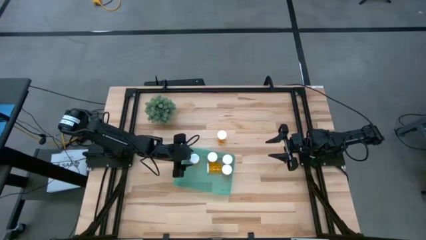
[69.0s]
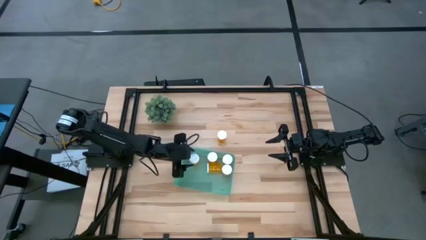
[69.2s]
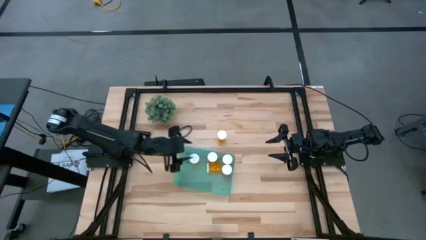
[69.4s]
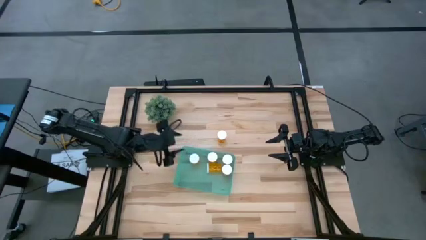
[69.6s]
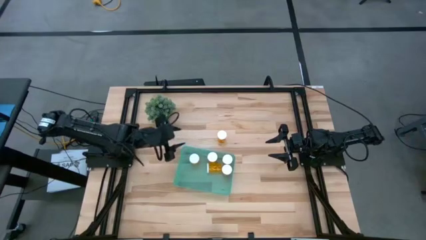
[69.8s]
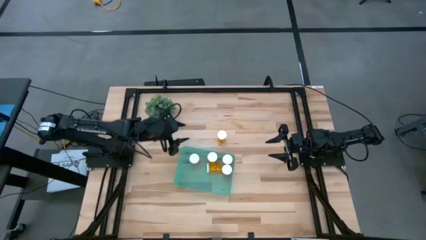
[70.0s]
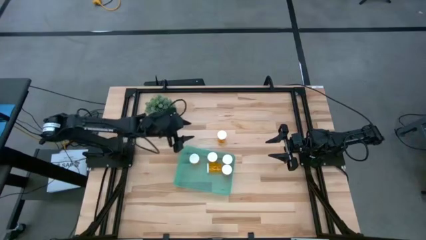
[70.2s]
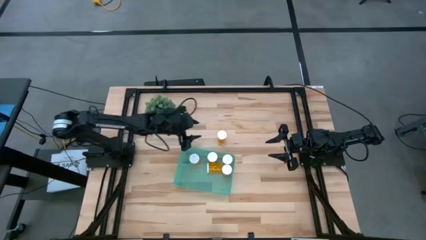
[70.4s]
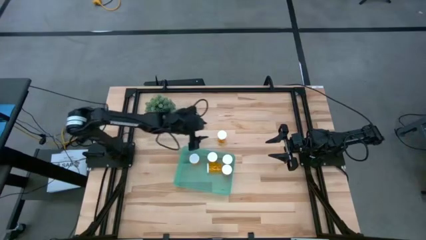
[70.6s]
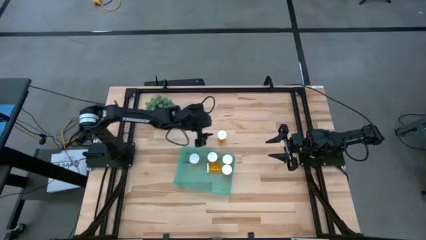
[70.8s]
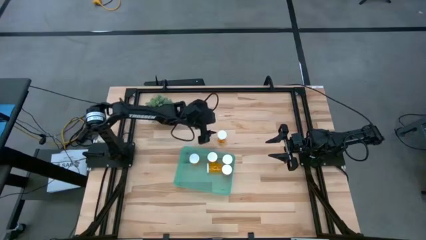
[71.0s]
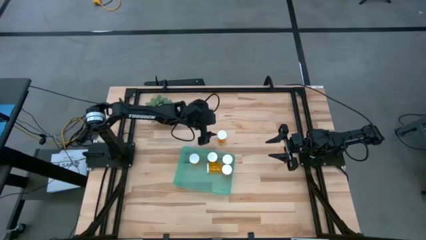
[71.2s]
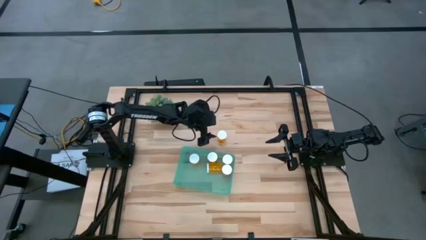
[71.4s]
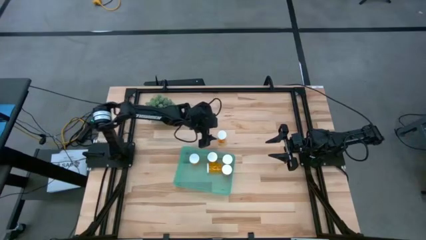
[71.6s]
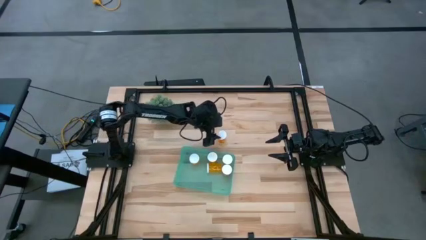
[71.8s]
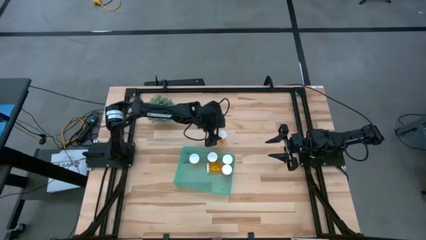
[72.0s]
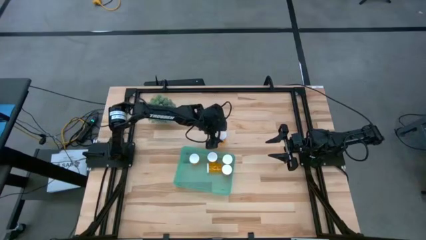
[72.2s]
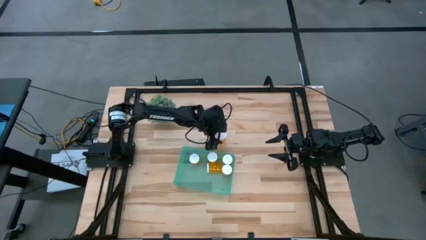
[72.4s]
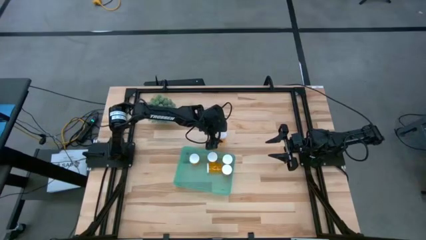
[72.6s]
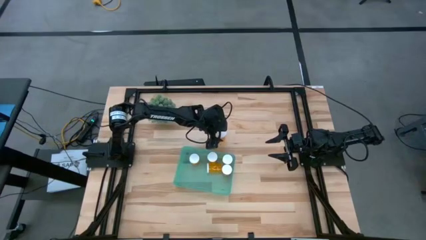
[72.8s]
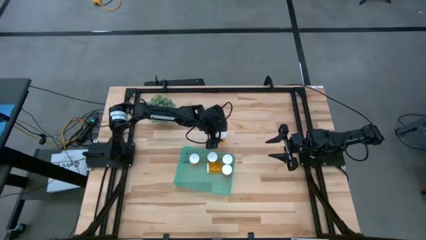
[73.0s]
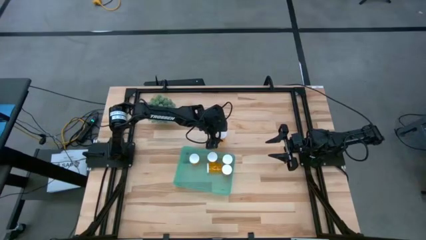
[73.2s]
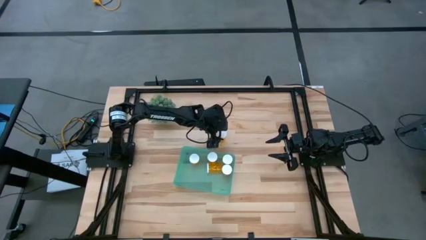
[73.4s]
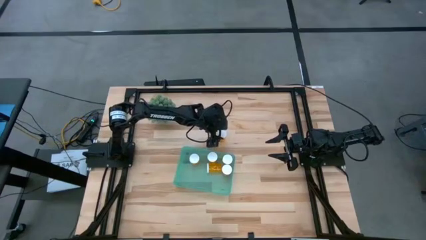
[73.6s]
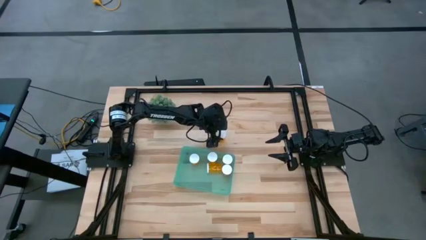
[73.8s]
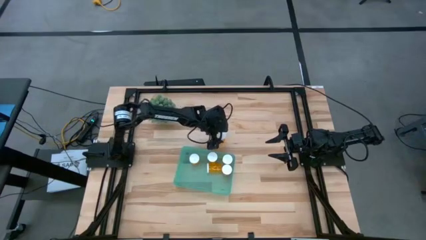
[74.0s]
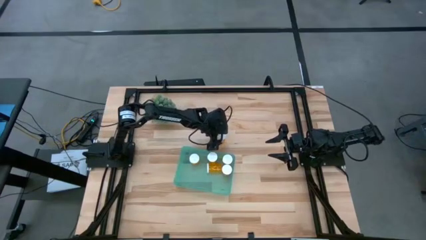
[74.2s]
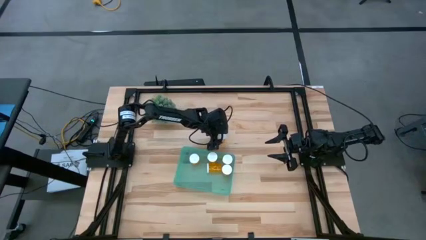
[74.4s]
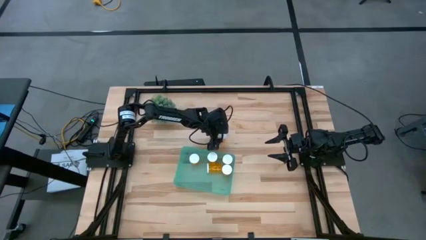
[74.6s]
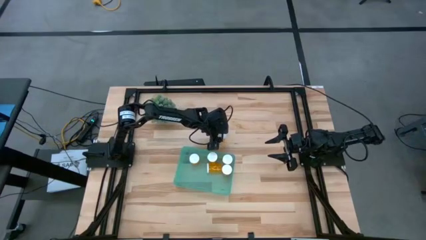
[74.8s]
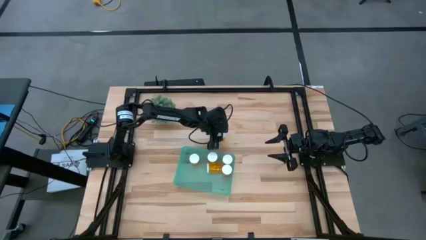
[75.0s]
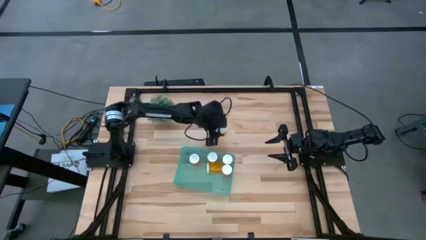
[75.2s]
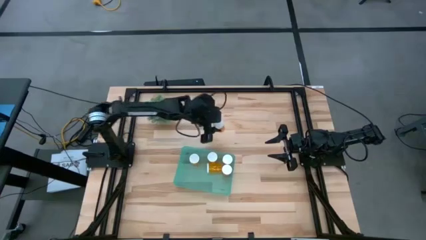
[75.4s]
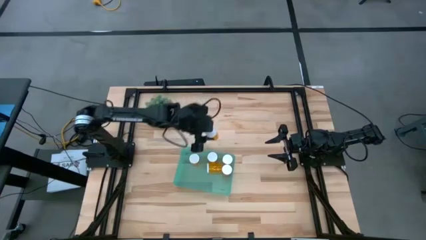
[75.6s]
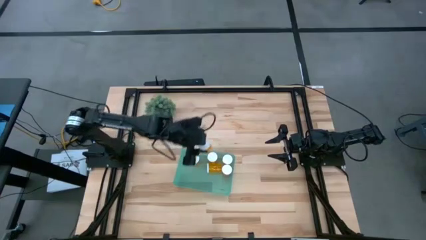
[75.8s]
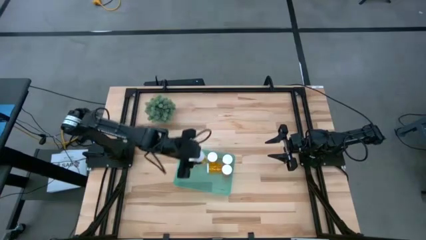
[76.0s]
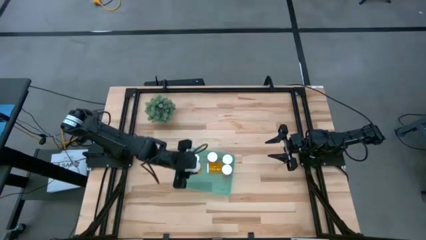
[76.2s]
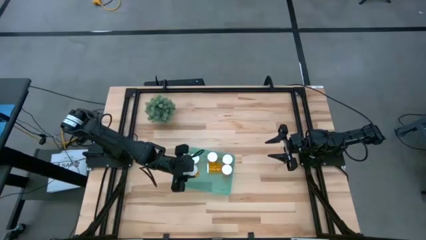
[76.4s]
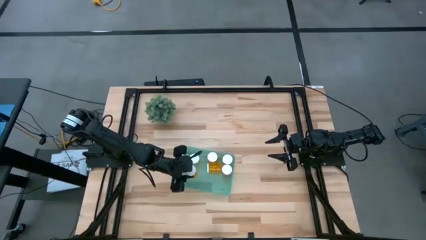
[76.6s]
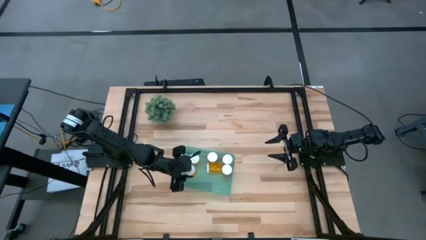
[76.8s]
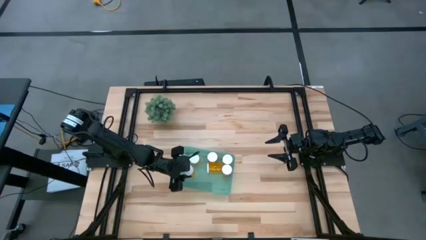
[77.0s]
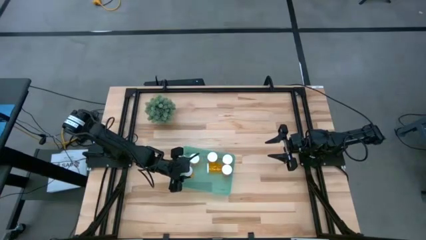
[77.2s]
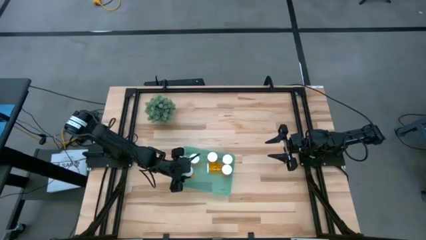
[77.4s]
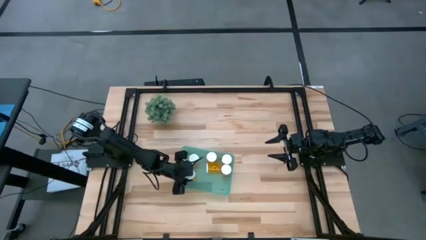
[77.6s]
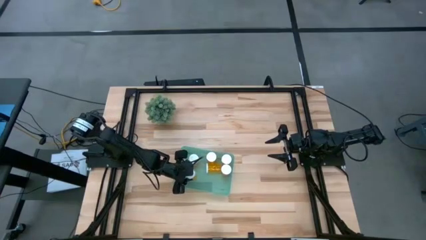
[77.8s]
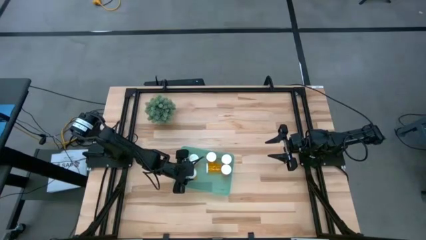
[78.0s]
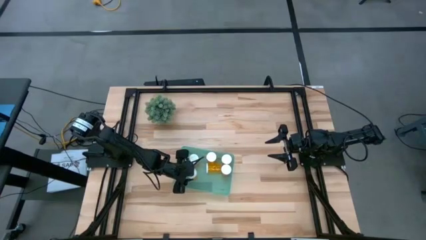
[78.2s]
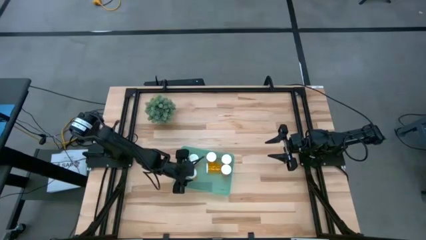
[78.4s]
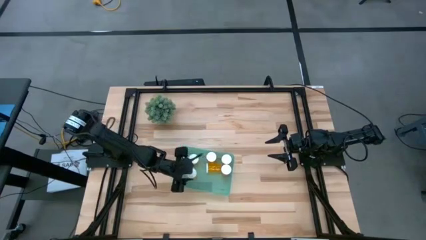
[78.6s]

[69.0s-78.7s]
Task: Pick and place pill bottles into a basket
Put the yellow pill bottle into the green bin

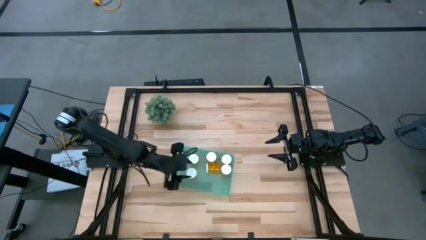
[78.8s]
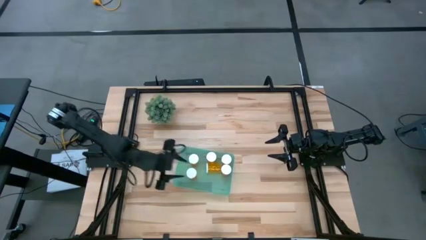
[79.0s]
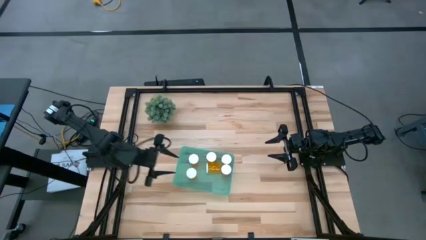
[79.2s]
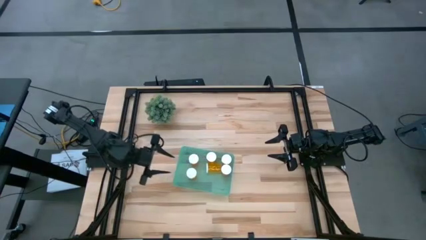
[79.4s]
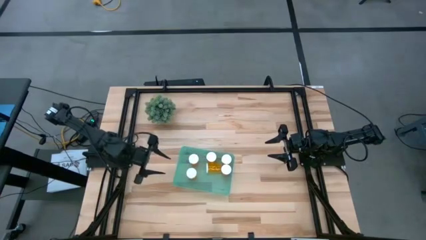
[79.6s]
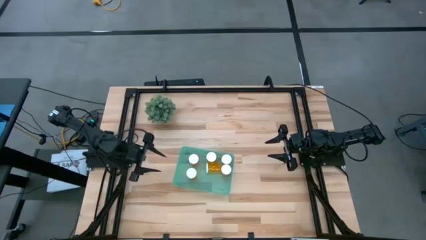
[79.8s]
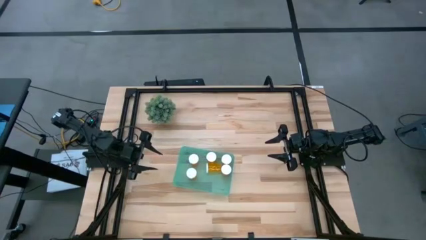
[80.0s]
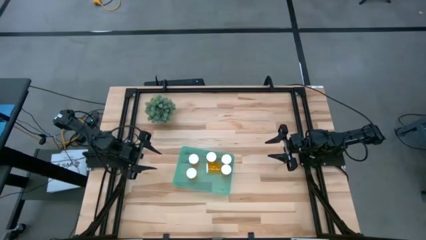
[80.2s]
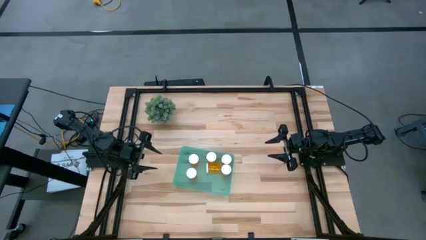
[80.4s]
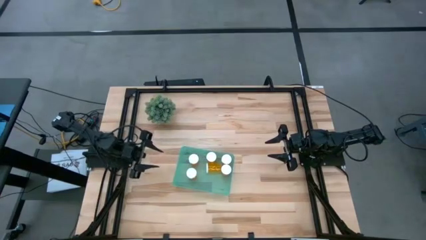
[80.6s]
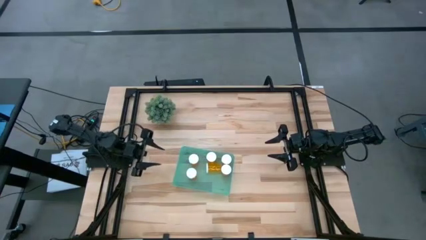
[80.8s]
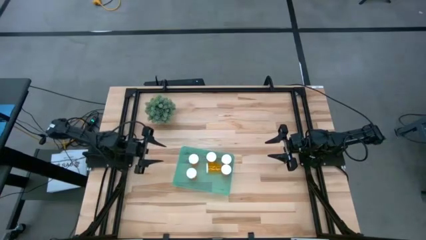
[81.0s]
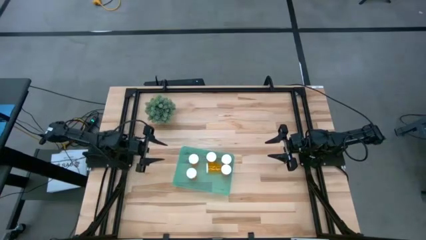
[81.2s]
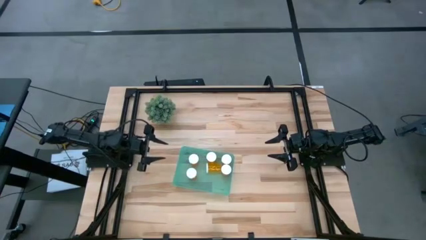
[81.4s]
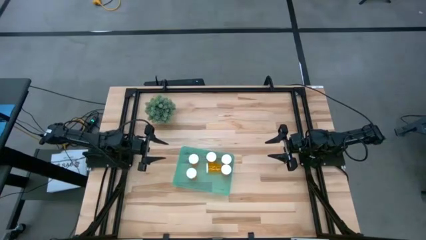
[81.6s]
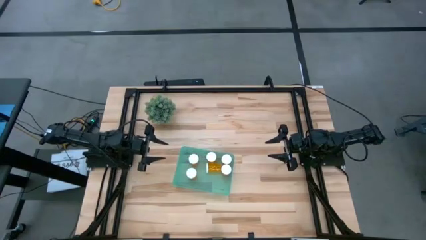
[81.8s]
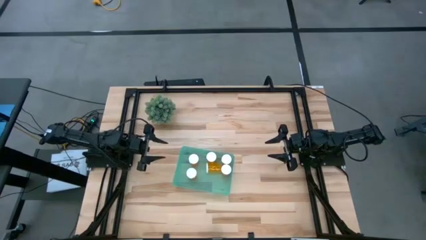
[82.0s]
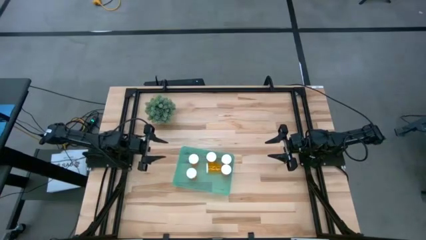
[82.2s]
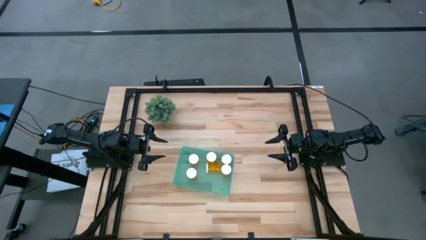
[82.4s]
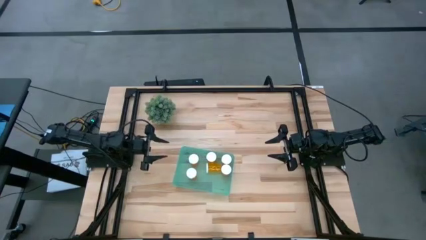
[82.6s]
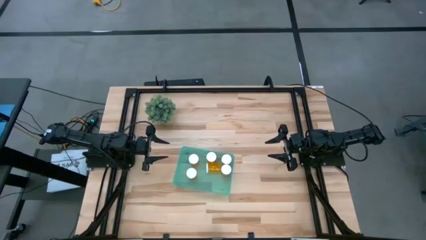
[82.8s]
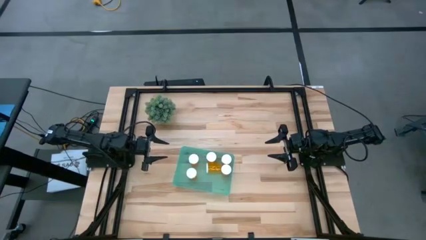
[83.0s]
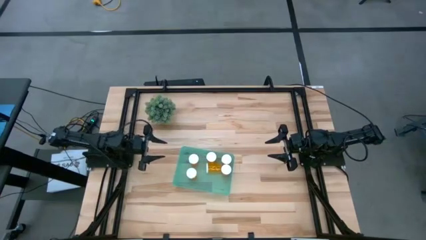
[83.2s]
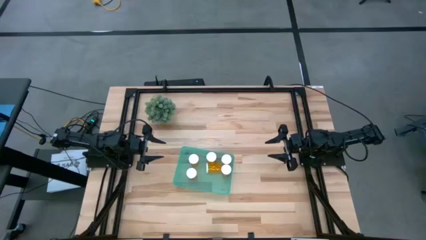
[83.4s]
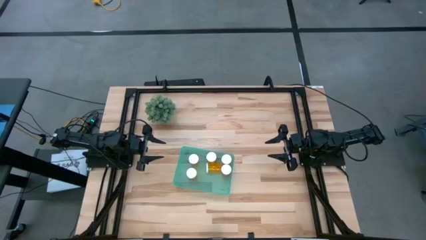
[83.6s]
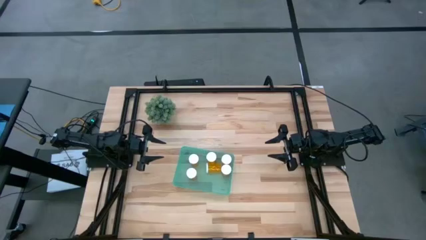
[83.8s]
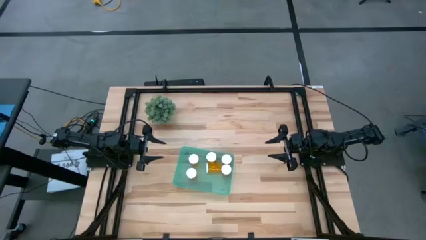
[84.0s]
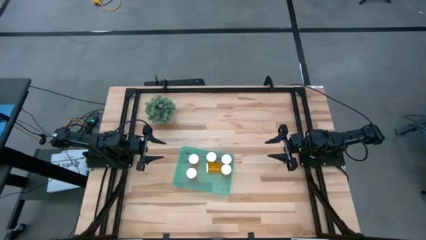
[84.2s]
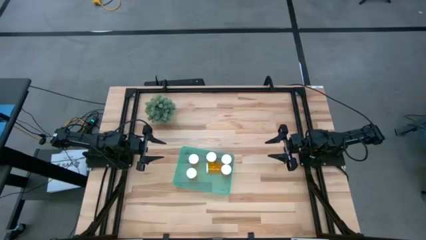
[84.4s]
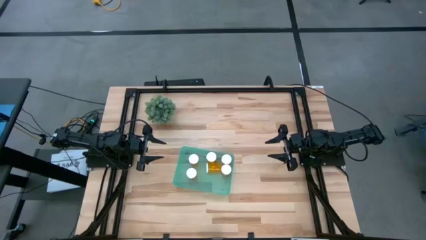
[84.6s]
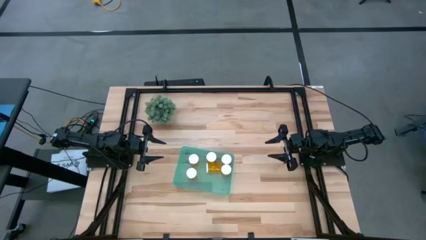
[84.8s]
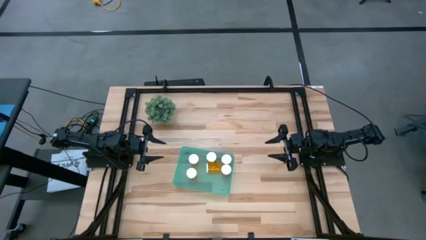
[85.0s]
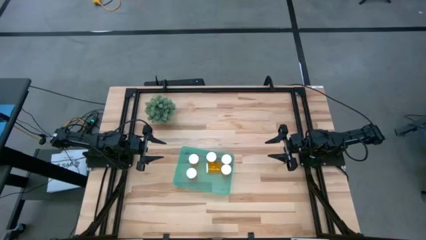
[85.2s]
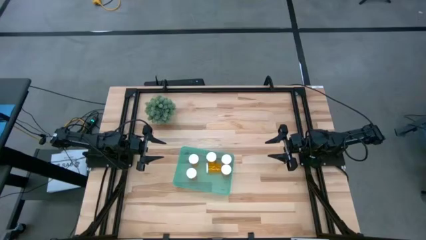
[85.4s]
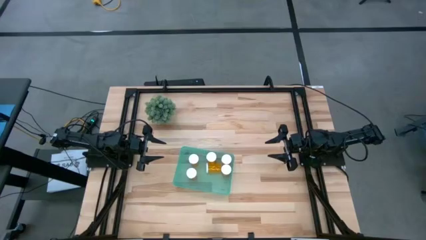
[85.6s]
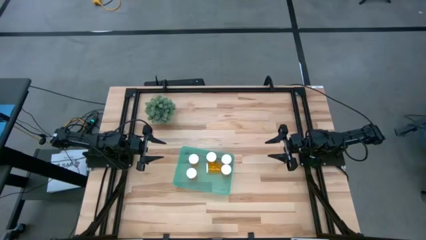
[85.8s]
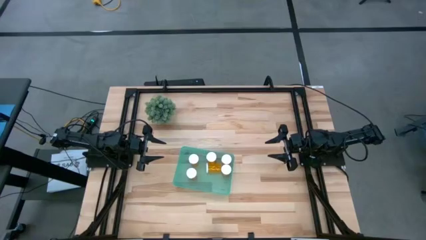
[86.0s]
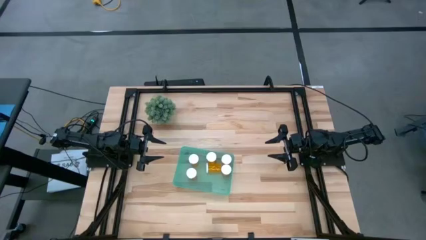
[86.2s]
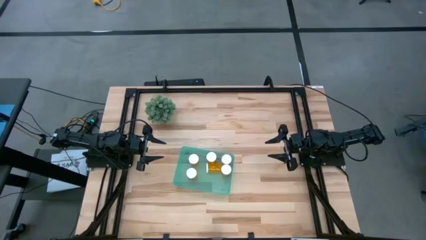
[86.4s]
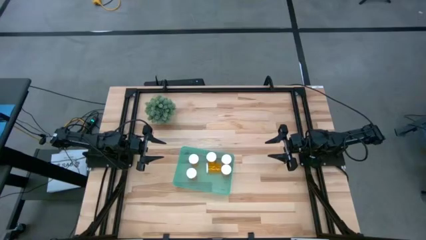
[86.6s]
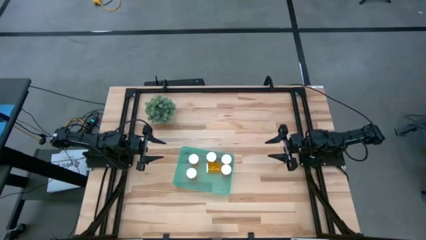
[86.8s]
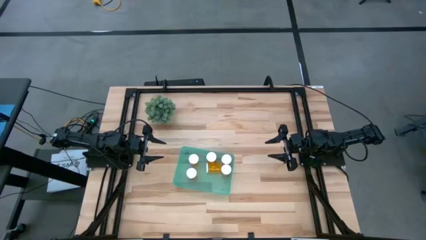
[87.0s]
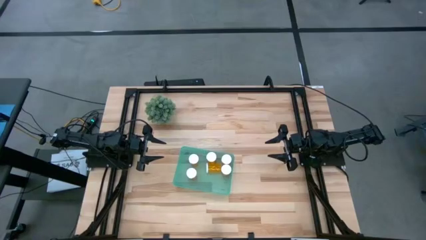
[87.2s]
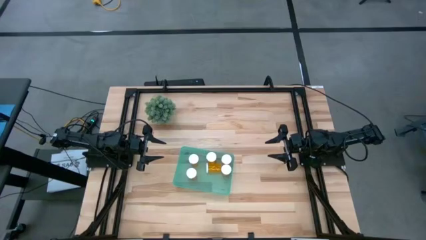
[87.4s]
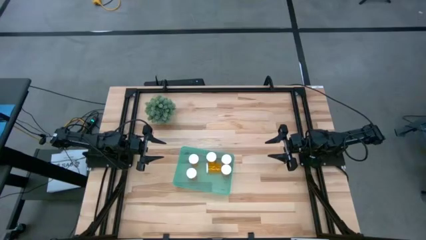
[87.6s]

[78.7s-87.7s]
Return to Home Position
